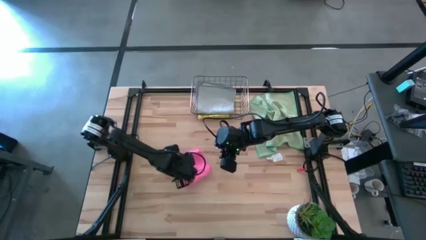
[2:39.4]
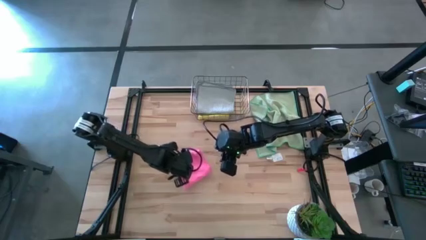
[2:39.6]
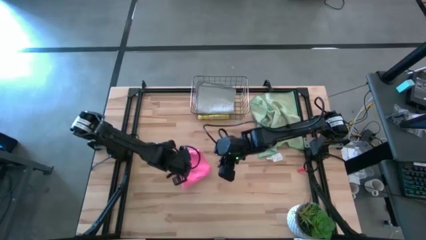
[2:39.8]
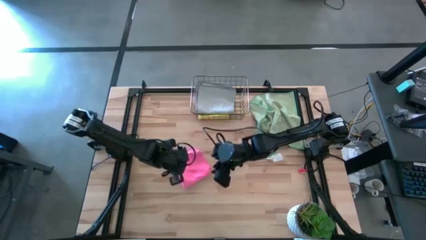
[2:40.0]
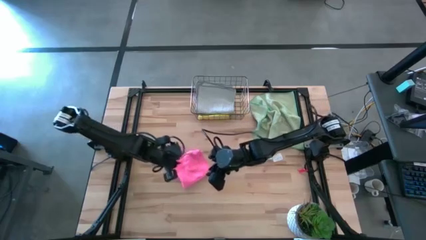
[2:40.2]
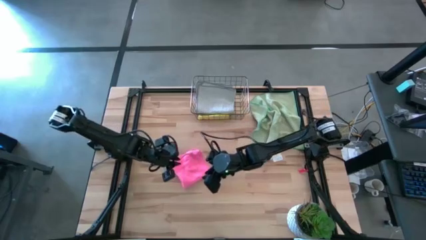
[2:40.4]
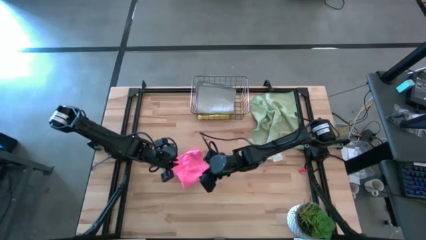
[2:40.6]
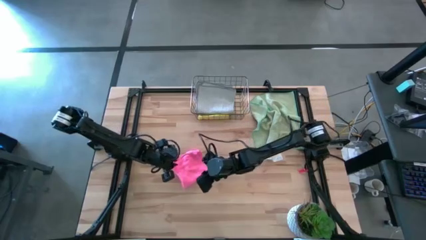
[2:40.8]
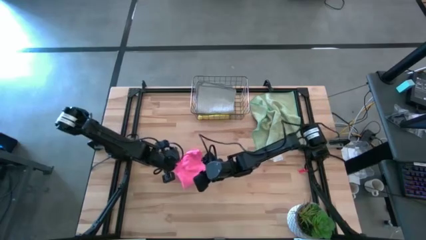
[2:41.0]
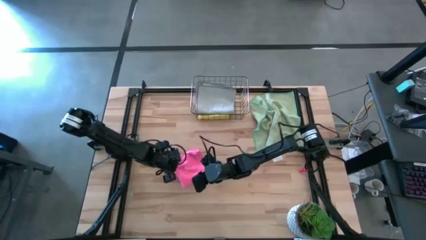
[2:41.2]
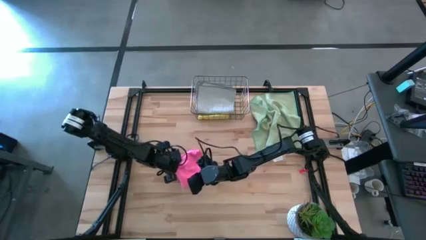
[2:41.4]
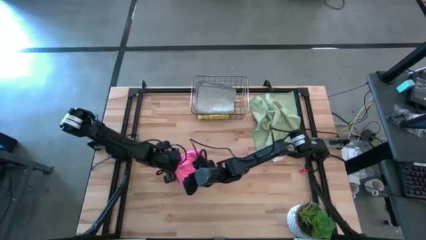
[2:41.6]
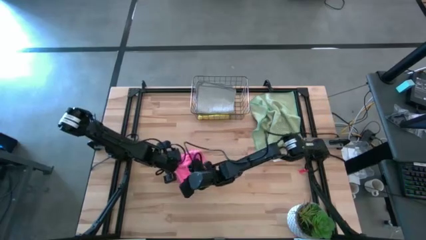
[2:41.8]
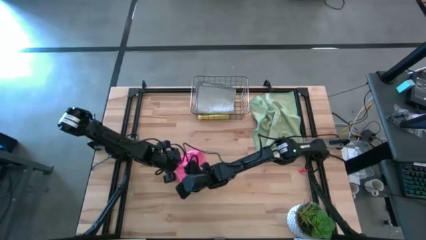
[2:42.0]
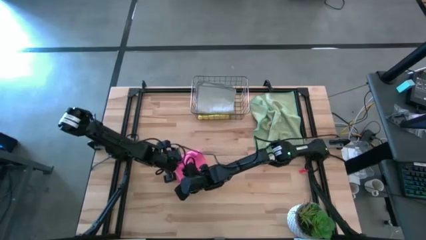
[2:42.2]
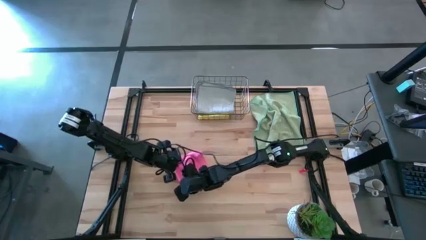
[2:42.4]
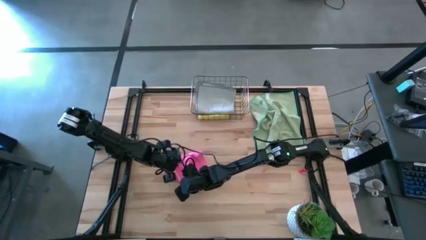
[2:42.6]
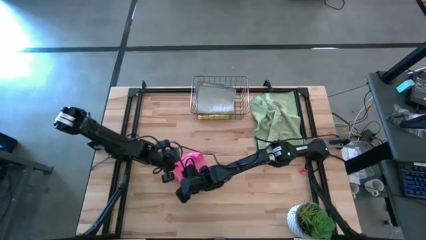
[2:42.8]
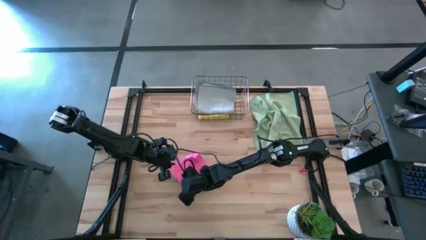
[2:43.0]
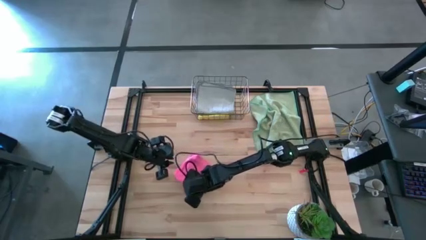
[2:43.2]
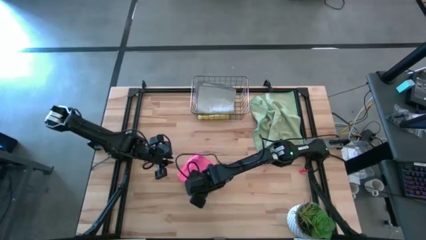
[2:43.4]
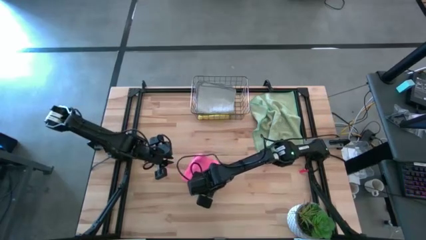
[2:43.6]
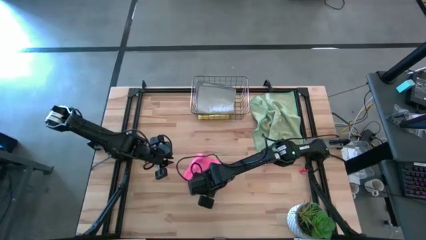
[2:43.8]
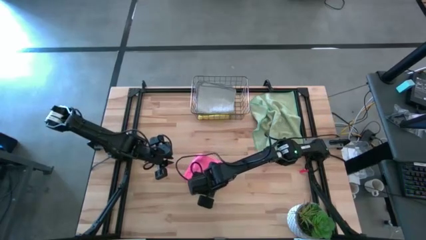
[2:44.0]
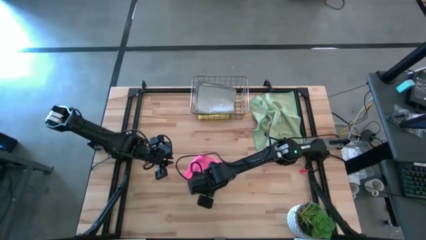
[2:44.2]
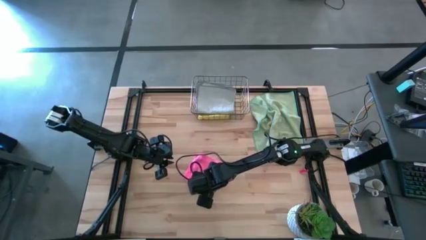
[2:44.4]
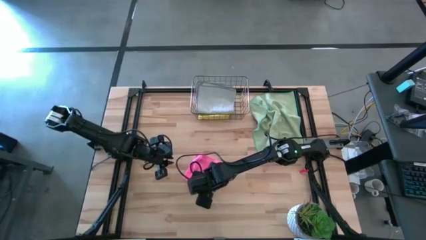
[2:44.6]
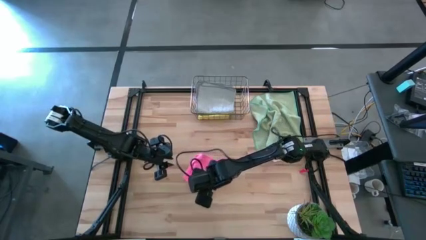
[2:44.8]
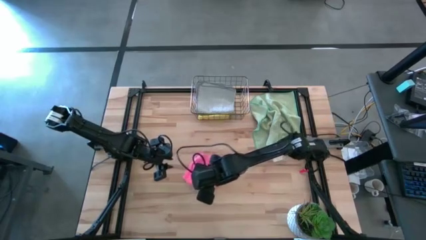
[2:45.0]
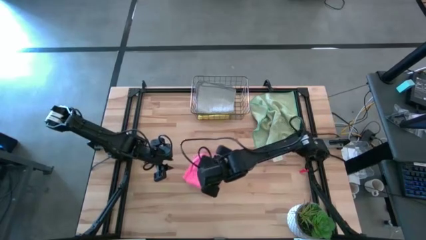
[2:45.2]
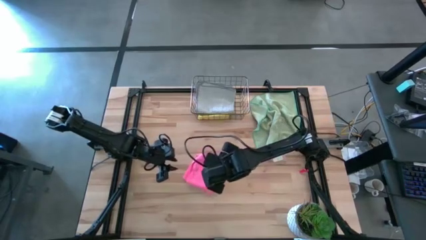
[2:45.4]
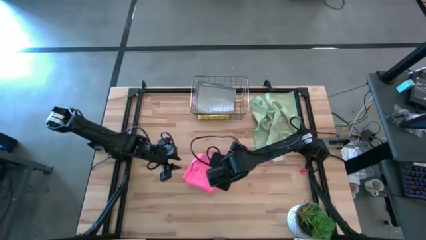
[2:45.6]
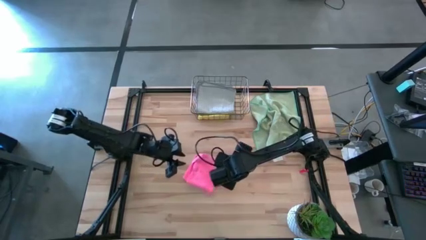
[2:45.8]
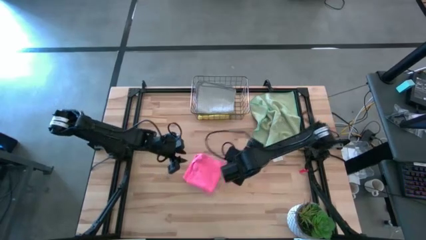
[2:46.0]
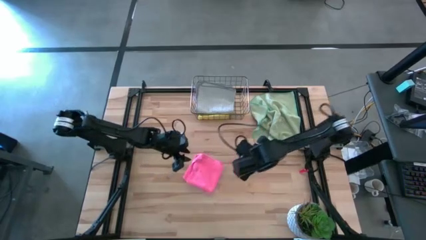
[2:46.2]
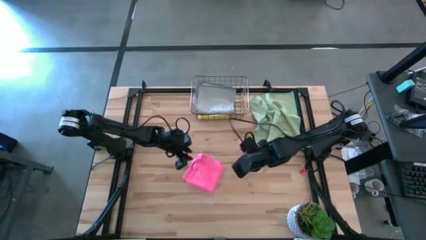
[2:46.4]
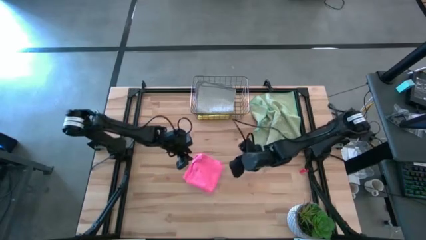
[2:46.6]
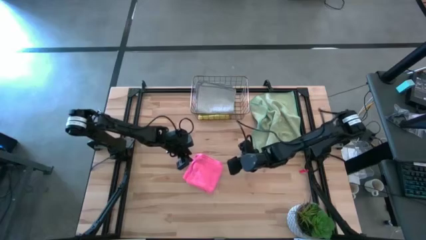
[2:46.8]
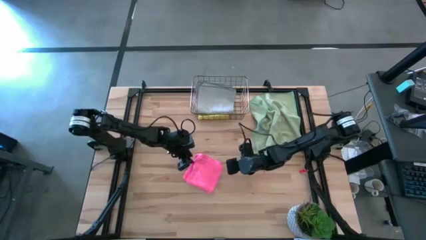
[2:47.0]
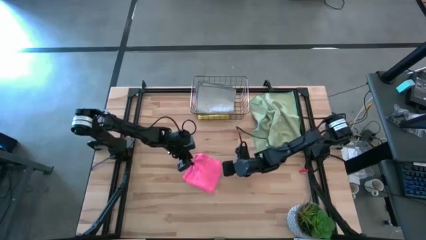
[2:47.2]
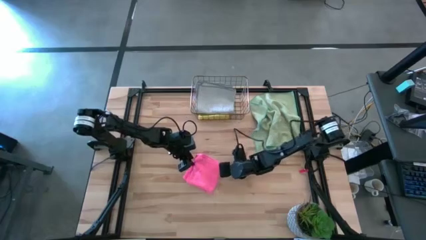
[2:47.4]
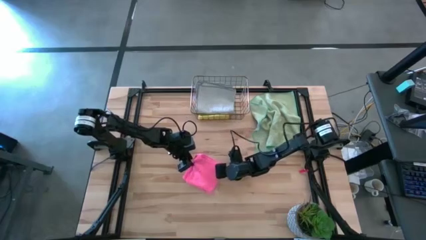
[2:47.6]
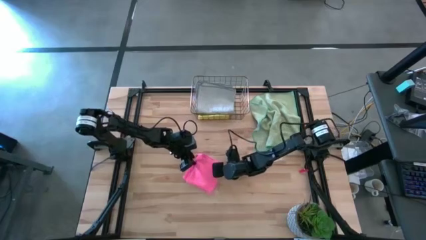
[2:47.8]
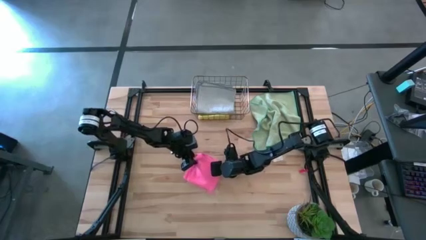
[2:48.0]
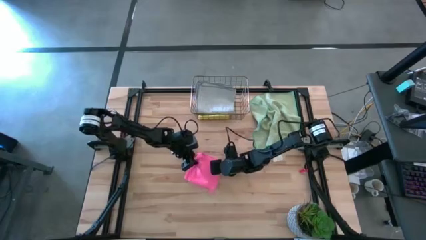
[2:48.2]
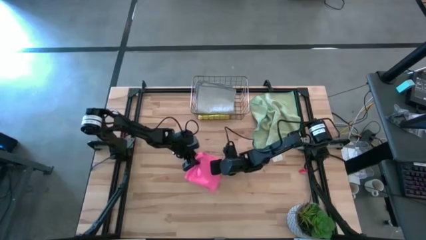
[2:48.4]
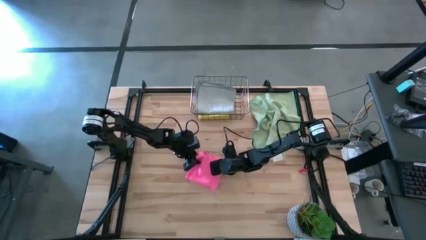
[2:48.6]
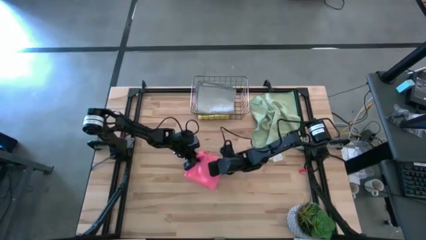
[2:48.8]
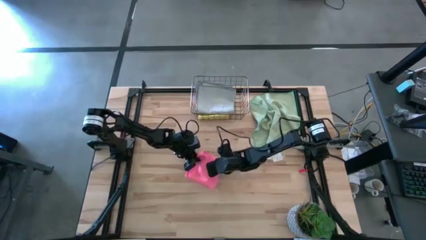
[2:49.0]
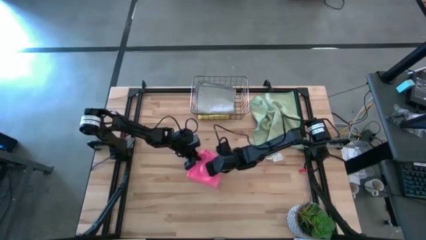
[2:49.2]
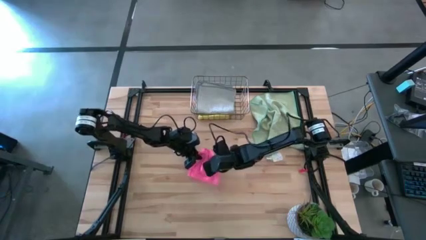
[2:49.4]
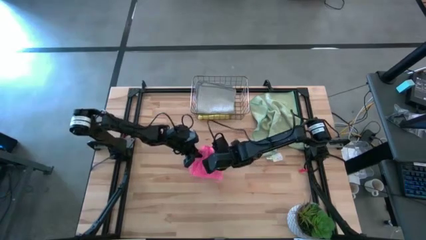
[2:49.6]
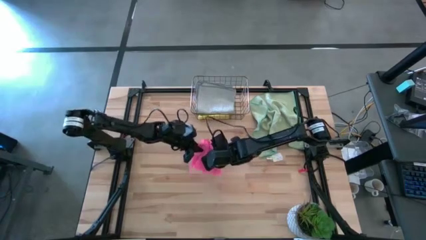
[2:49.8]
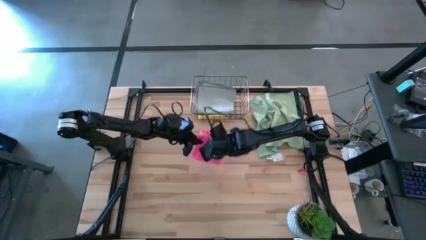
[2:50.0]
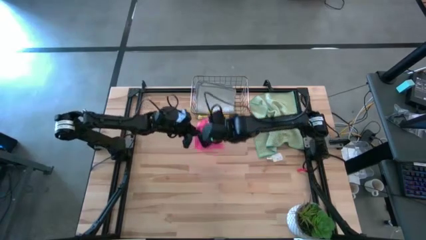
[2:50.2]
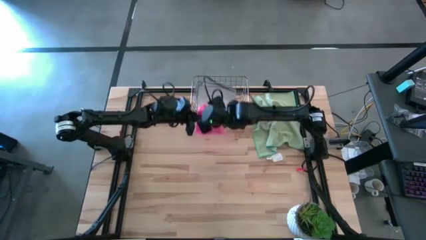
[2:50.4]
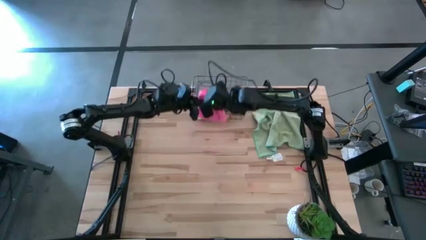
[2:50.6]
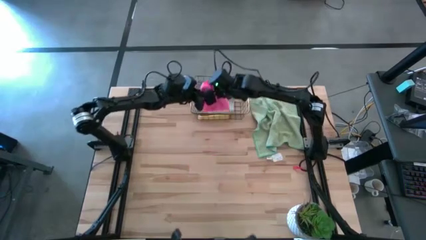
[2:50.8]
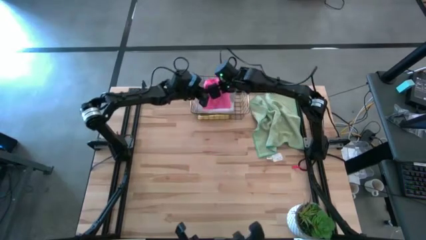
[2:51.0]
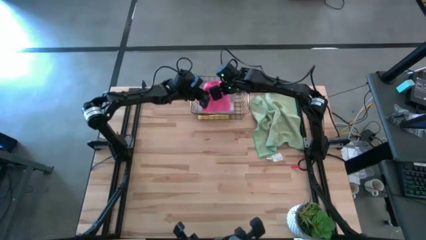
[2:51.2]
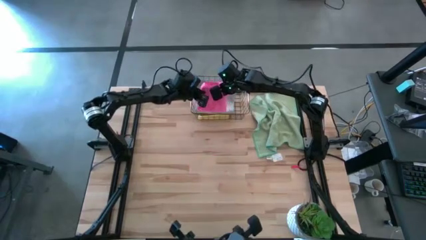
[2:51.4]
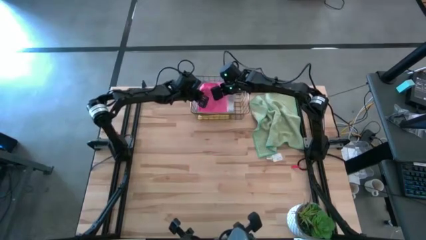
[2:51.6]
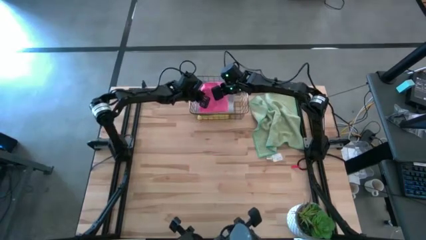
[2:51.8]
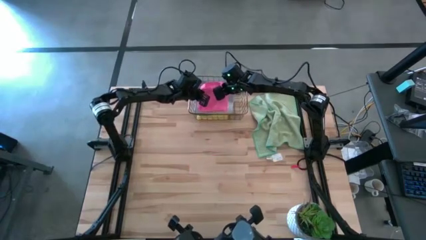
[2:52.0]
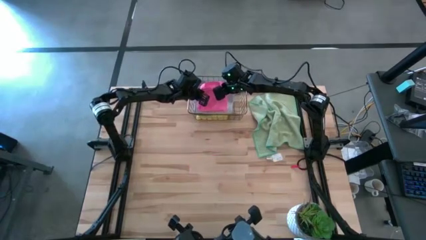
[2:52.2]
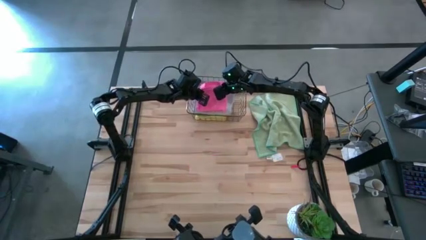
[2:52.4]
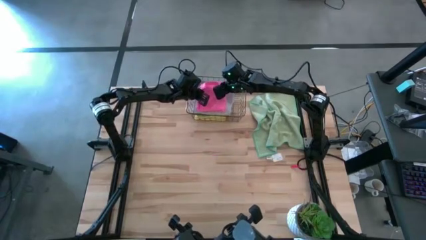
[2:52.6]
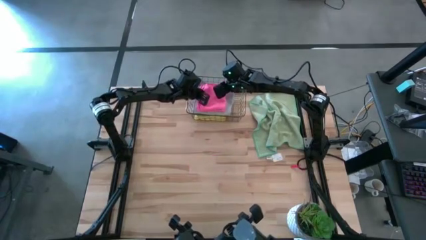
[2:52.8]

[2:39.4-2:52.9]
Task: Fold microfiber towels
Put the pink towel into the wire basket
